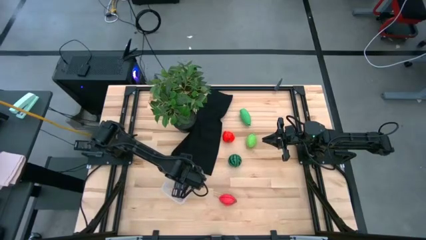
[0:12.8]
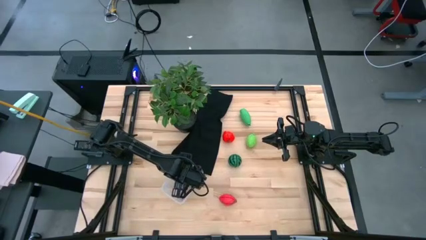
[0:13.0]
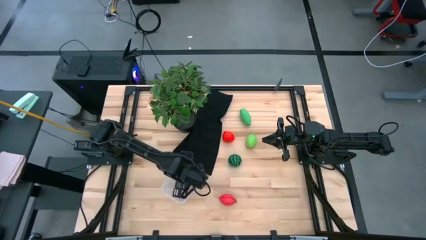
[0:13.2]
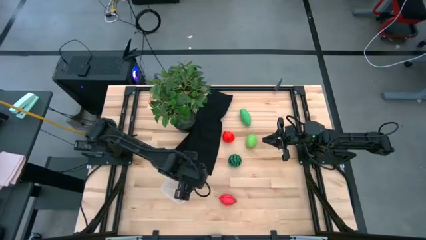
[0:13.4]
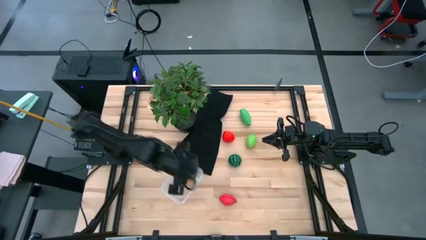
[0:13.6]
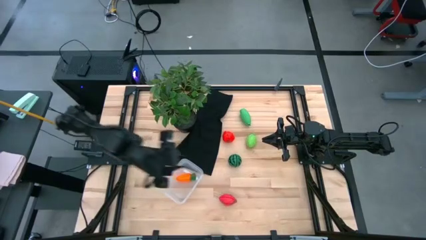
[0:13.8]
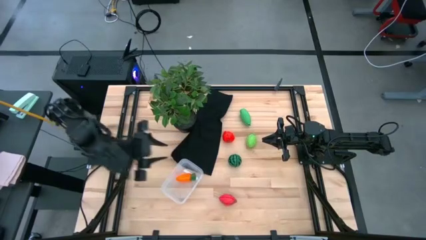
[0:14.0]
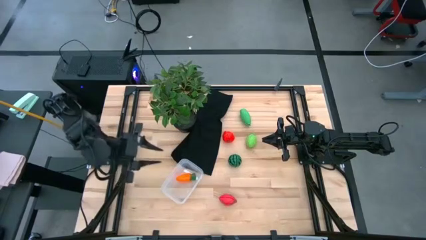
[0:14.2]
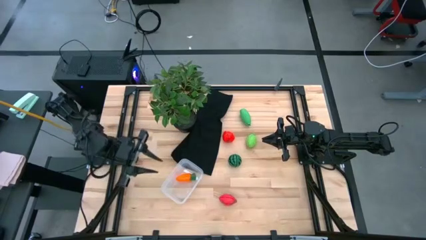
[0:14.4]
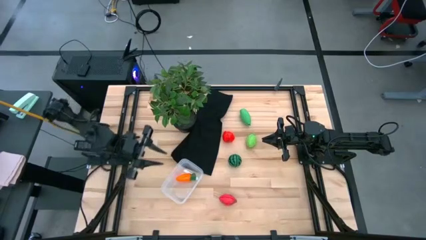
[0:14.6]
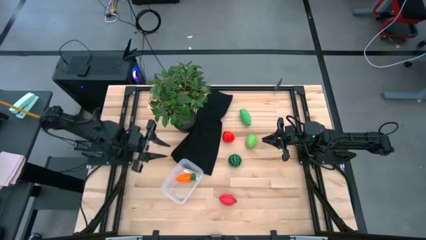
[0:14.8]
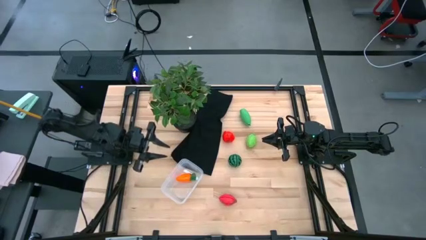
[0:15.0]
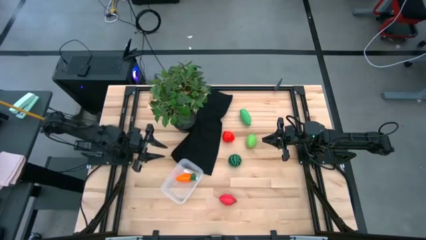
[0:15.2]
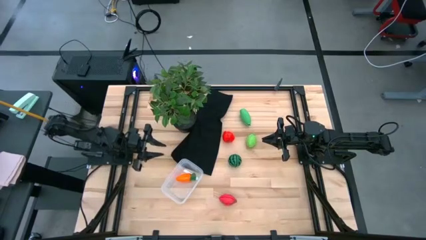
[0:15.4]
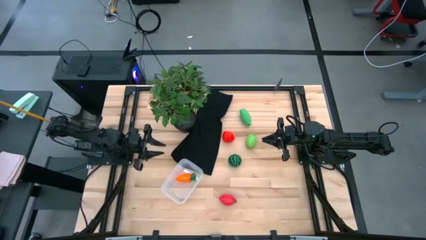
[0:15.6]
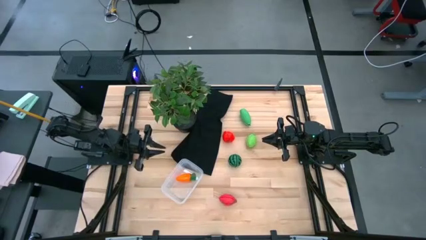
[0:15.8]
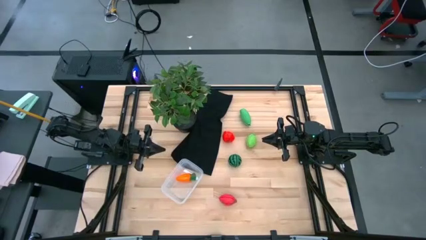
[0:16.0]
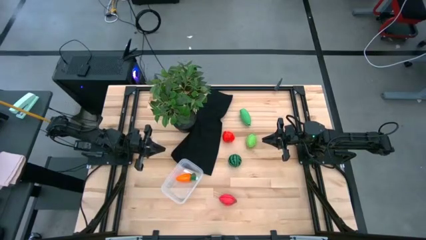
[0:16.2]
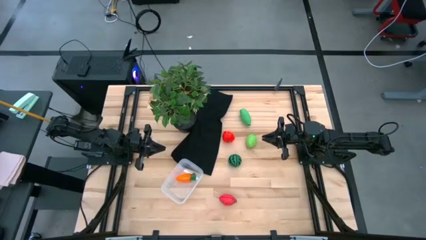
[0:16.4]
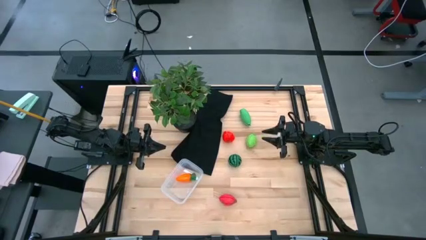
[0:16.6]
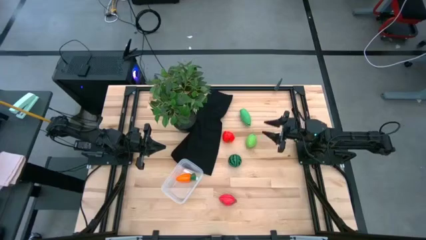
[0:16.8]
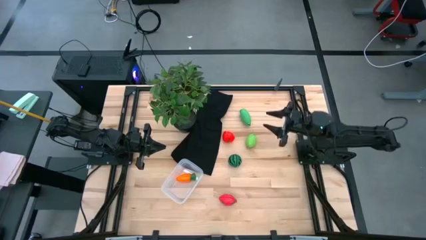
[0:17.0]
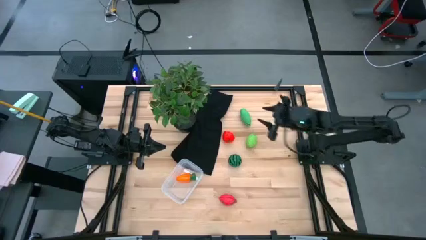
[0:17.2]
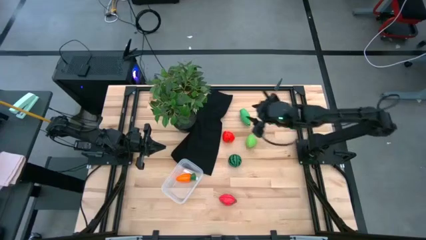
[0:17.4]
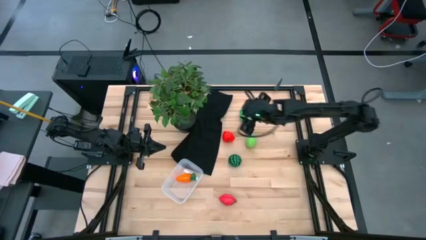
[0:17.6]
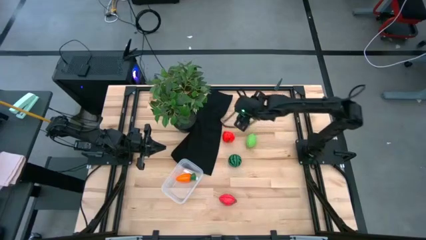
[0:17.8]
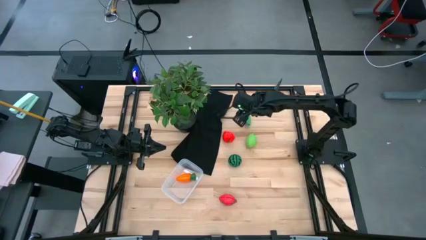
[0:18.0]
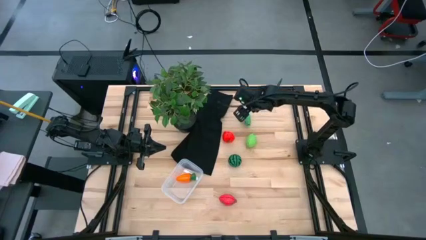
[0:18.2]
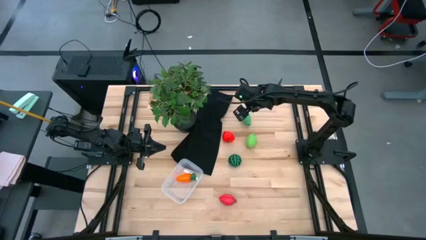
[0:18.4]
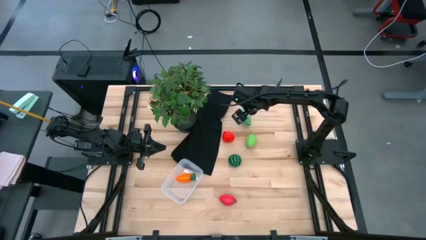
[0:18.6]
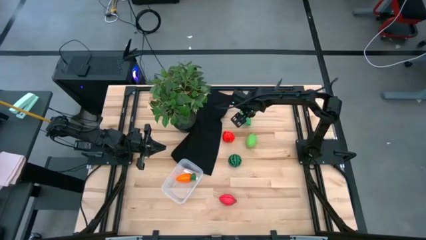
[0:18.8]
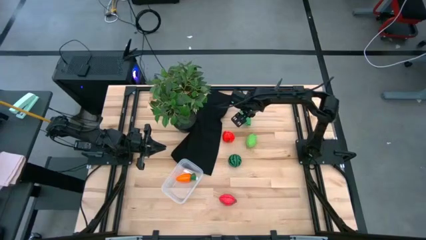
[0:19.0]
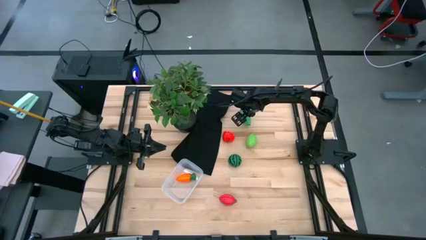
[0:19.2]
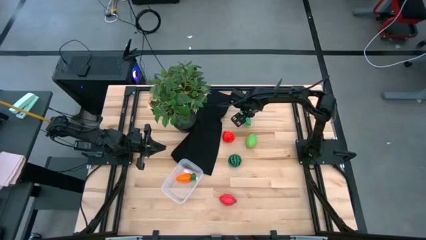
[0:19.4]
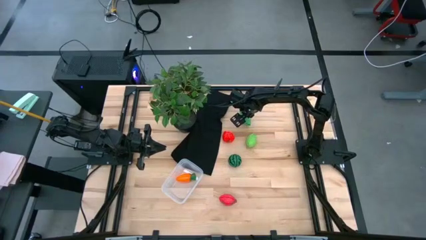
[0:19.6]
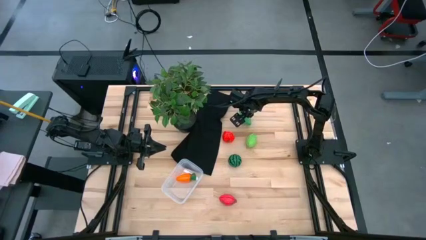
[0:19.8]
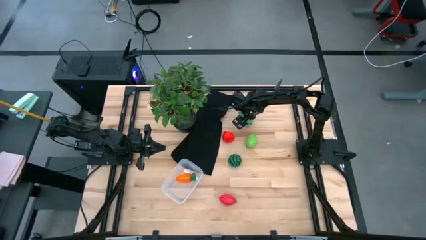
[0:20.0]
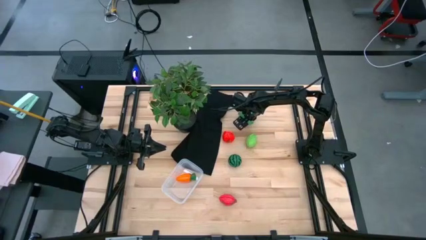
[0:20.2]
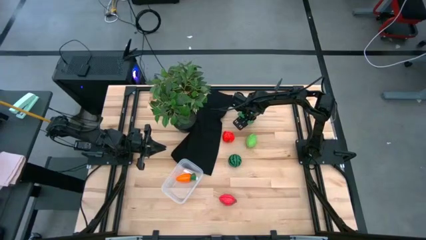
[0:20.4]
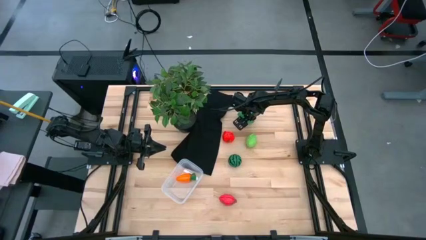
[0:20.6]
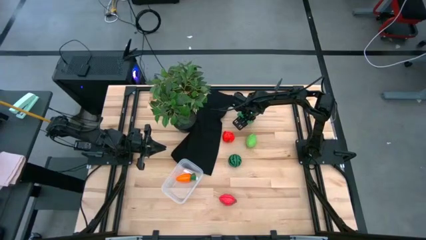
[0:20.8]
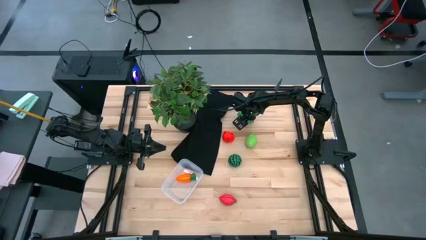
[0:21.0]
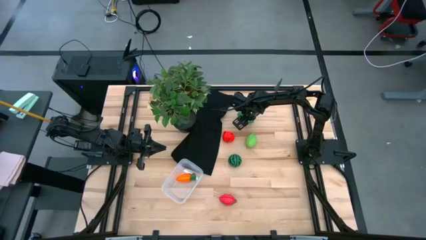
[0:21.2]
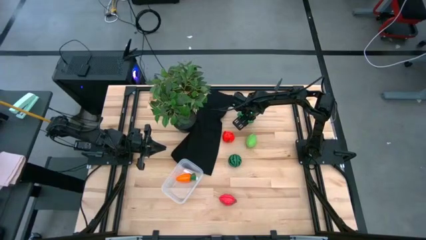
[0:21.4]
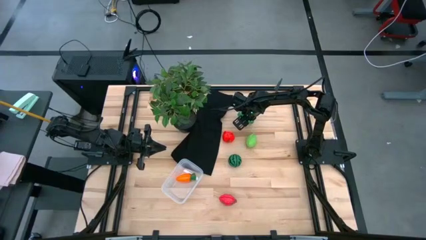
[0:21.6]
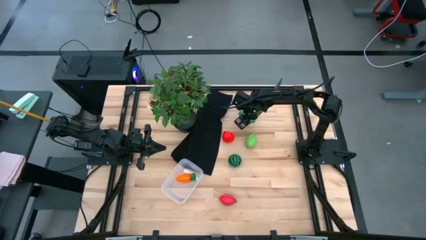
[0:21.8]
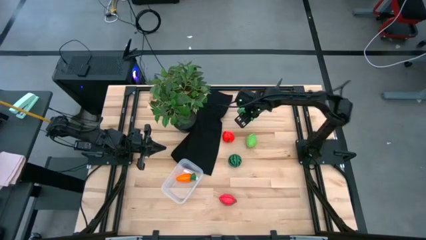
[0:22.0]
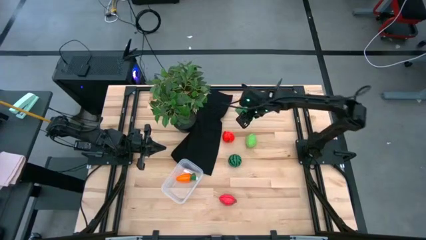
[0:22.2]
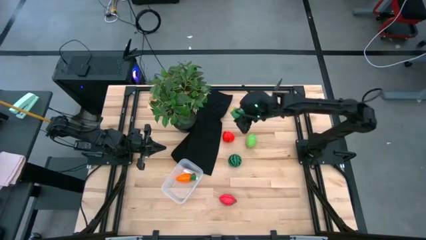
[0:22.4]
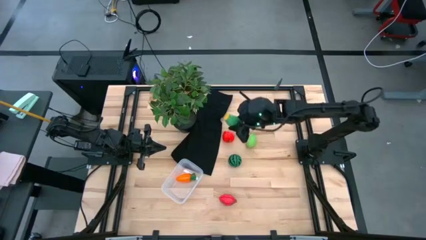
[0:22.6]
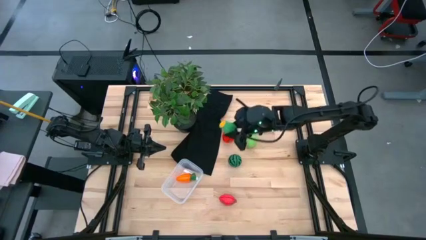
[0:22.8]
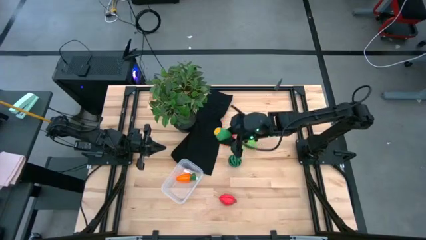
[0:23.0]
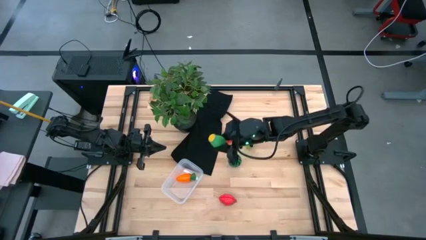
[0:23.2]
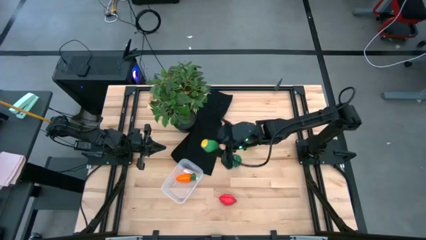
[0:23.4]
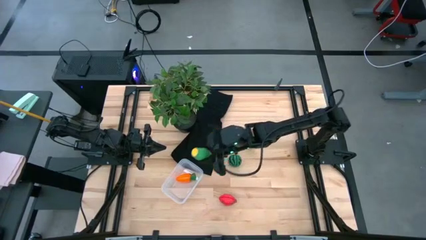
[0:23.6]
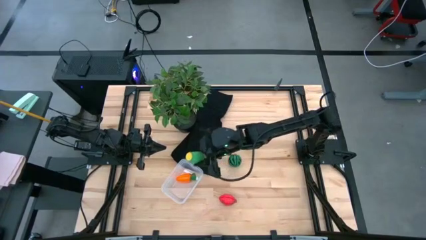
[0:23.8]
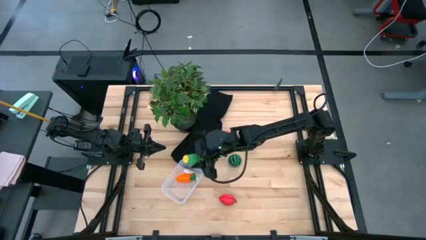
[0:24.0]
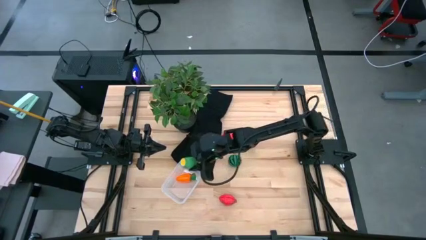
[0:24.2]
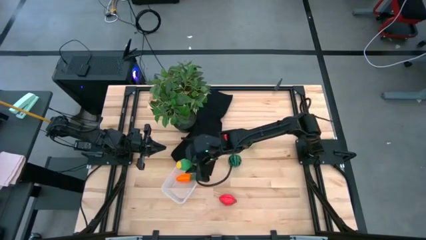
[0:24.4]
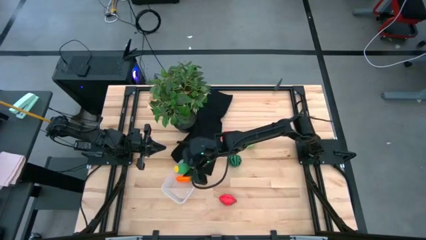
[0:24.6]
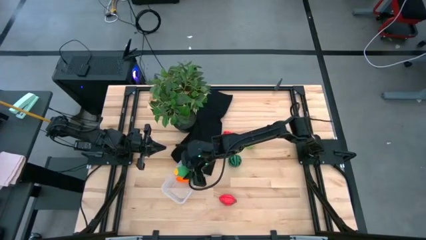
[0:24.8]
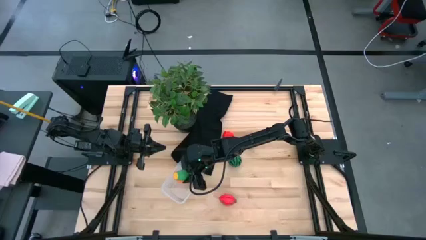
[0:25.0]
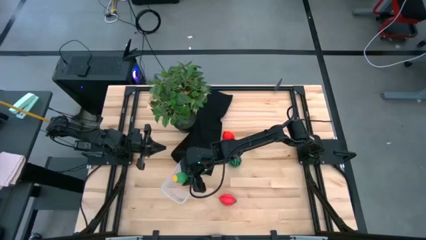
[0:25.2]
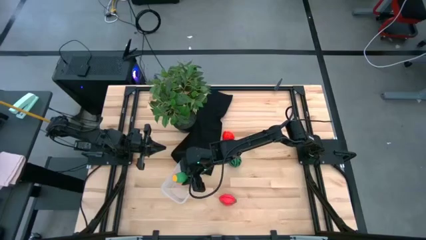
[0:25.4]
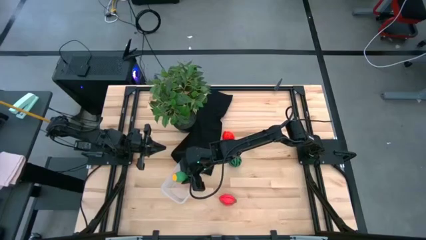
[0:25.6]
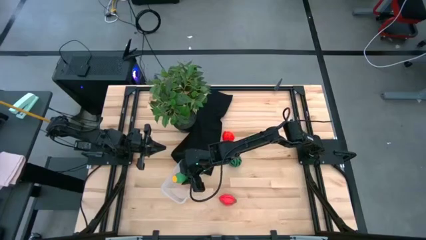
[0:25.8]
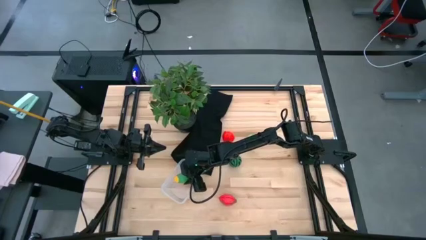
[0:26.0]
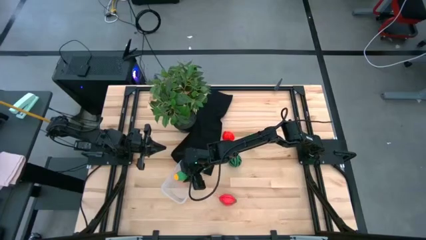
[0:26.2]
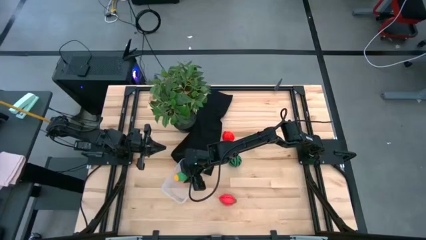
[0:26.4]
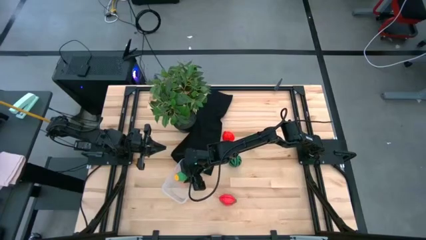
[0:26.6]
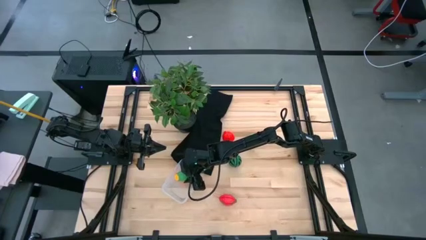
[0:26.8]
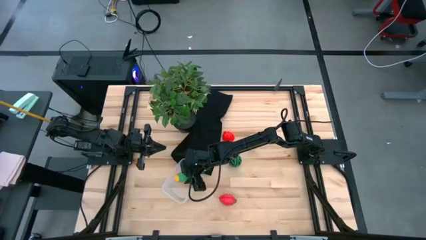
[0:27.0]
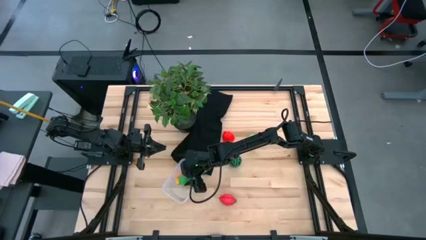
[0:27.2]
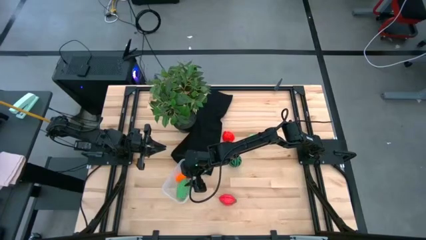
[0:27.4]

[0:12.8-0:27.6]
Task: Pick and placing Produce into tupperware
Put the green corn into the transparent bin
